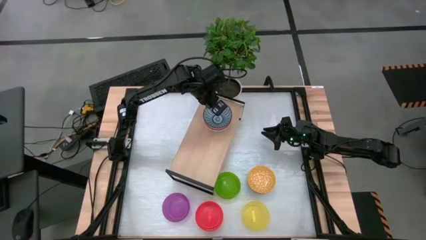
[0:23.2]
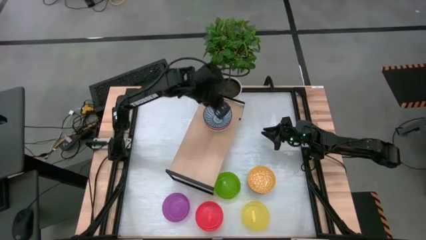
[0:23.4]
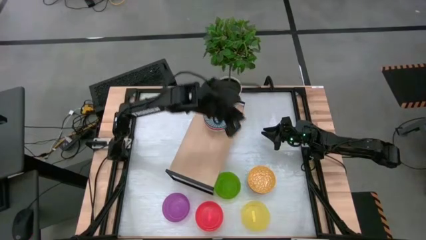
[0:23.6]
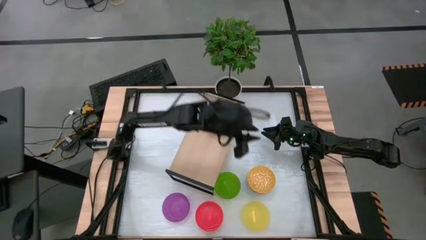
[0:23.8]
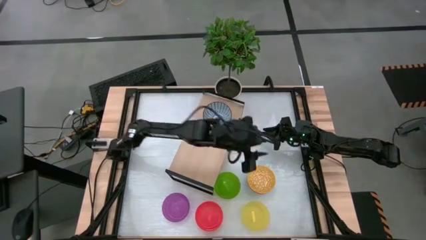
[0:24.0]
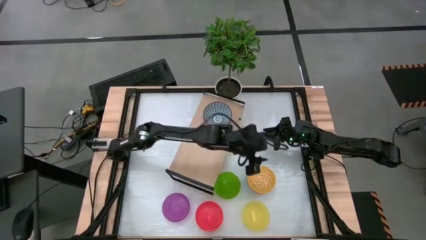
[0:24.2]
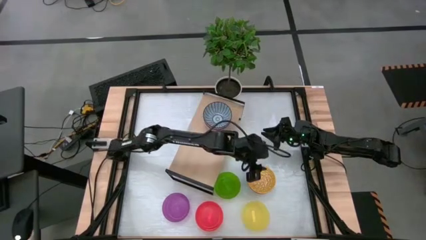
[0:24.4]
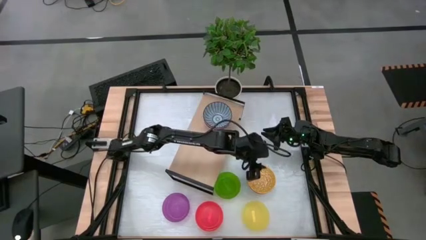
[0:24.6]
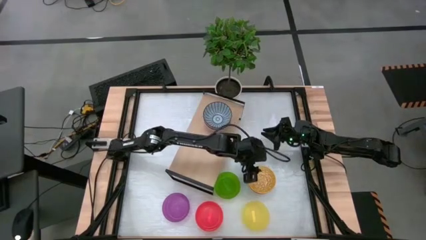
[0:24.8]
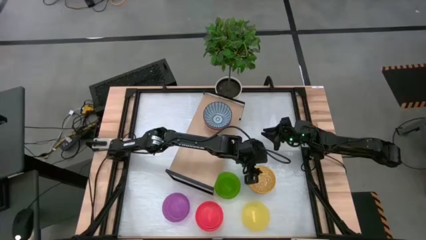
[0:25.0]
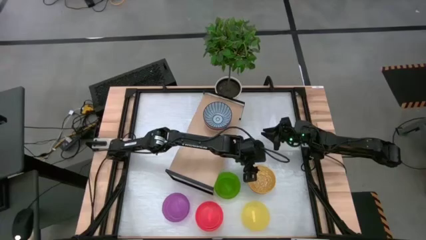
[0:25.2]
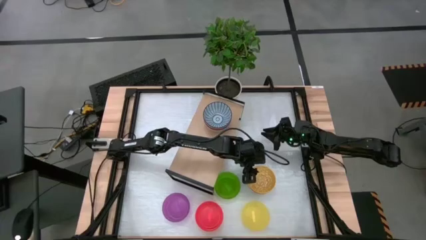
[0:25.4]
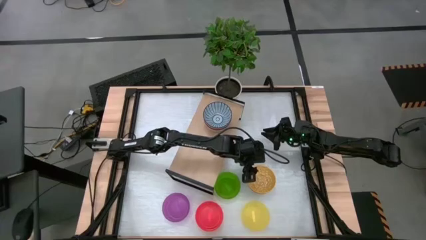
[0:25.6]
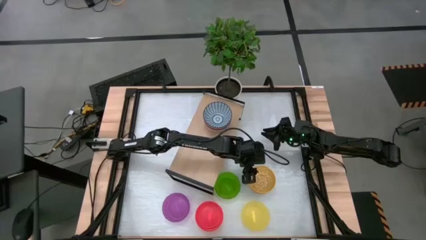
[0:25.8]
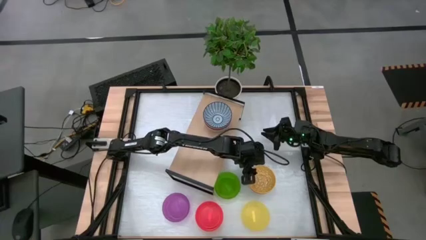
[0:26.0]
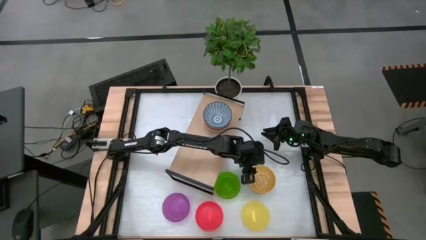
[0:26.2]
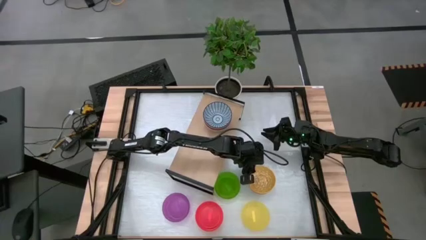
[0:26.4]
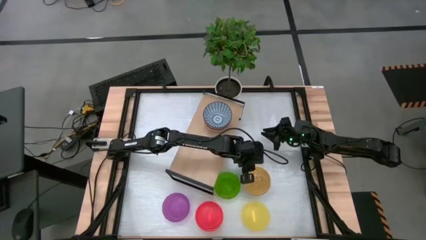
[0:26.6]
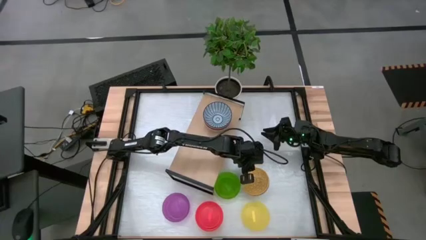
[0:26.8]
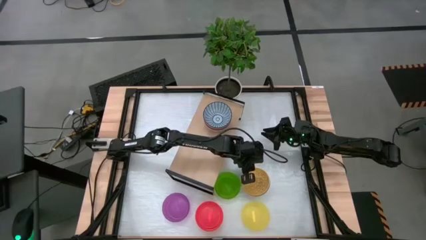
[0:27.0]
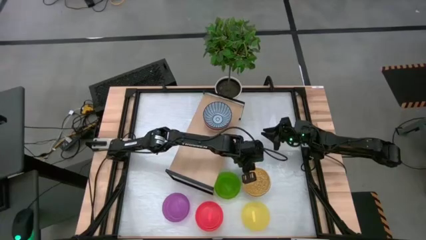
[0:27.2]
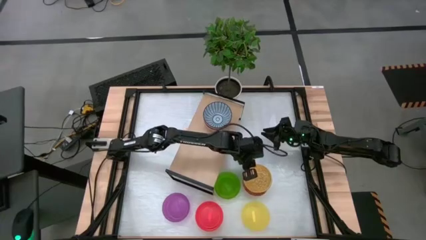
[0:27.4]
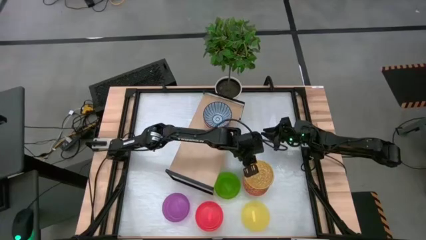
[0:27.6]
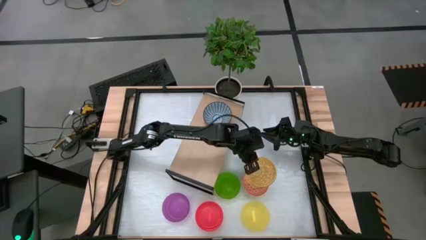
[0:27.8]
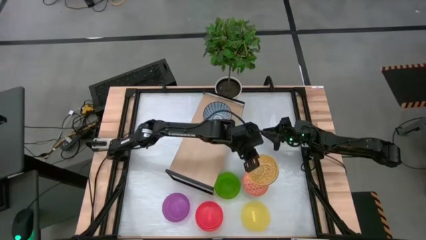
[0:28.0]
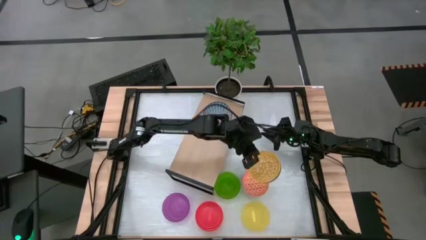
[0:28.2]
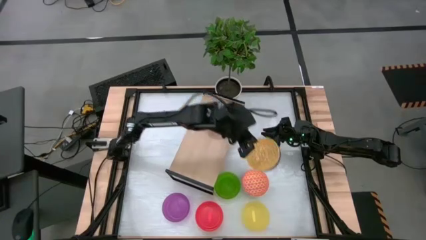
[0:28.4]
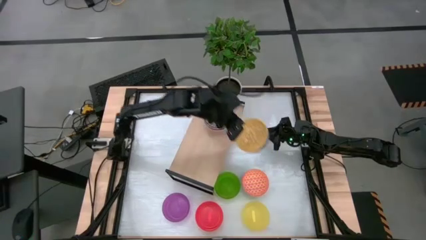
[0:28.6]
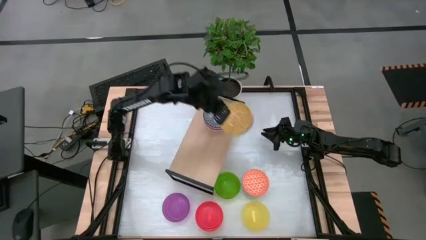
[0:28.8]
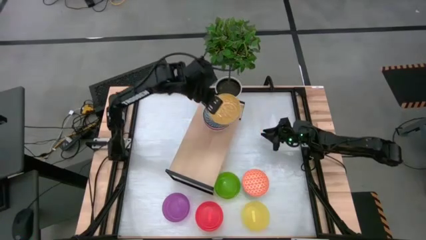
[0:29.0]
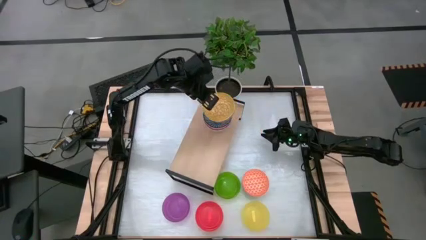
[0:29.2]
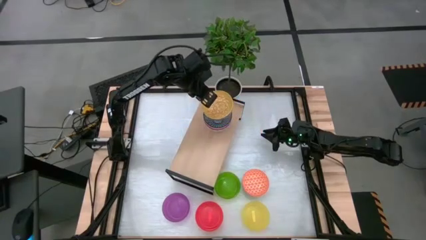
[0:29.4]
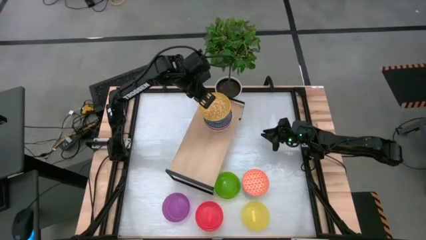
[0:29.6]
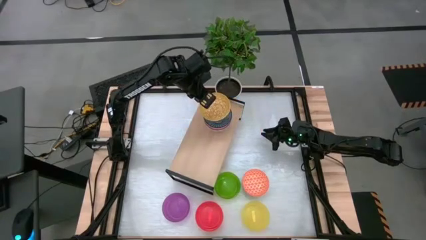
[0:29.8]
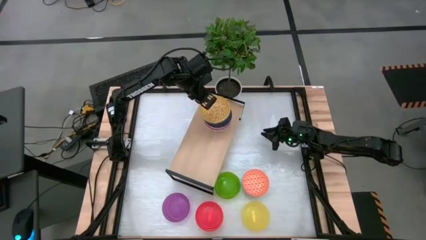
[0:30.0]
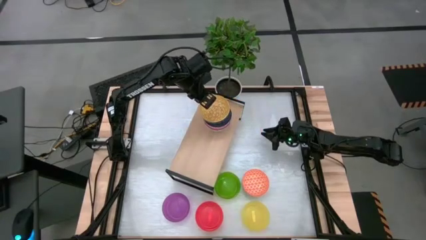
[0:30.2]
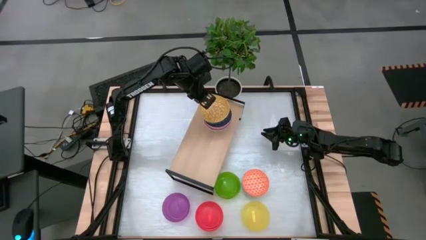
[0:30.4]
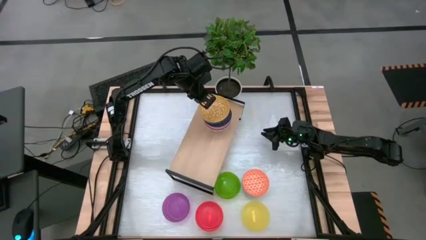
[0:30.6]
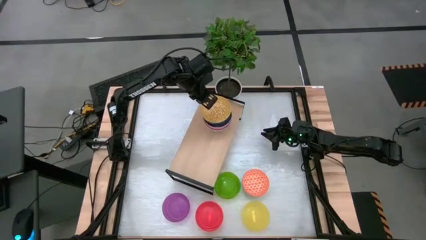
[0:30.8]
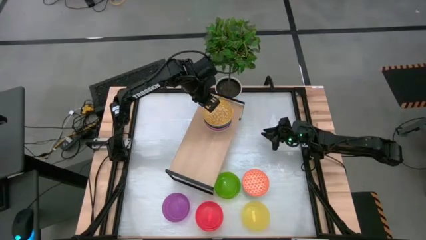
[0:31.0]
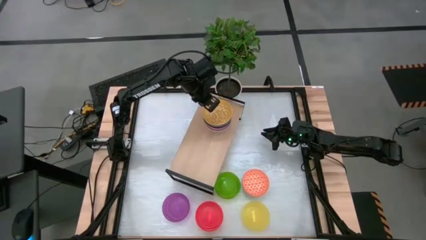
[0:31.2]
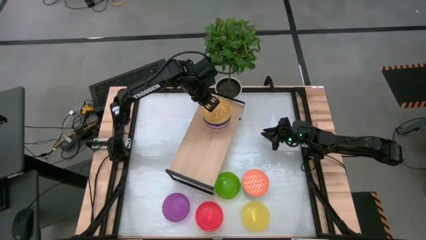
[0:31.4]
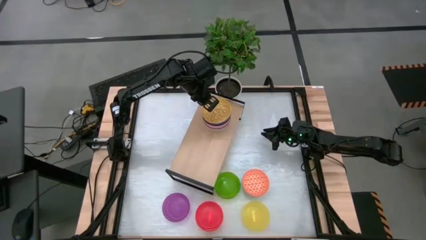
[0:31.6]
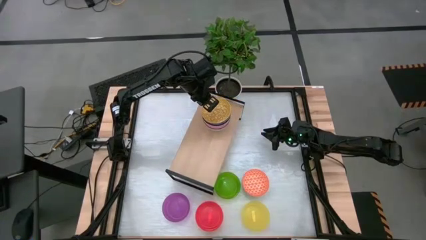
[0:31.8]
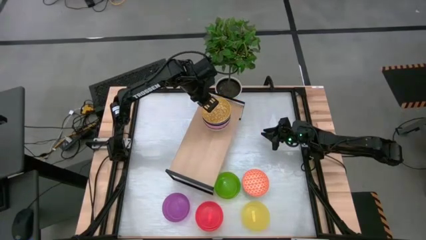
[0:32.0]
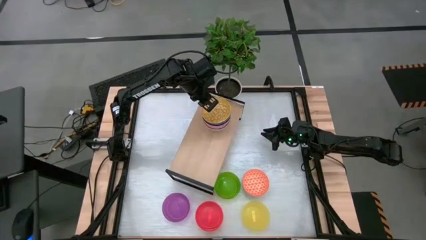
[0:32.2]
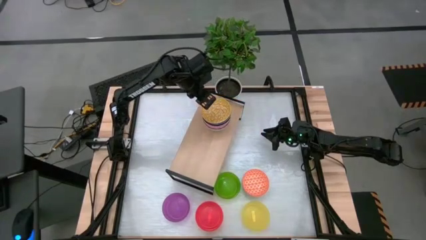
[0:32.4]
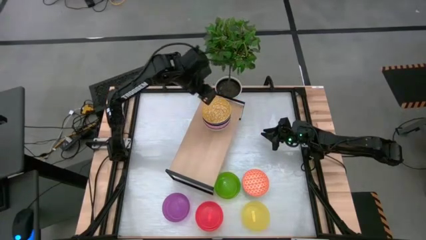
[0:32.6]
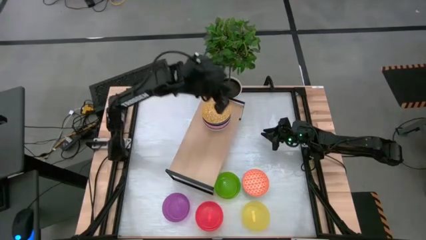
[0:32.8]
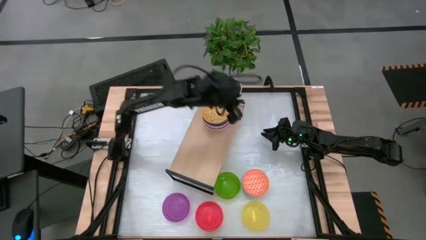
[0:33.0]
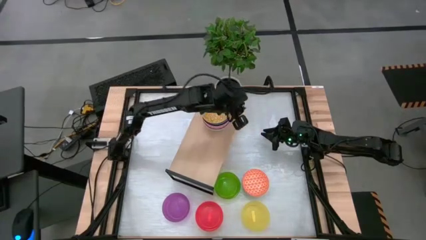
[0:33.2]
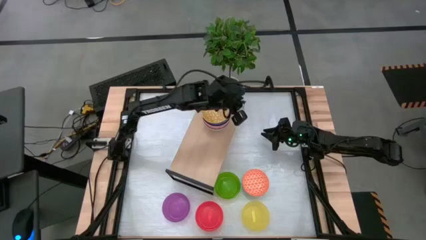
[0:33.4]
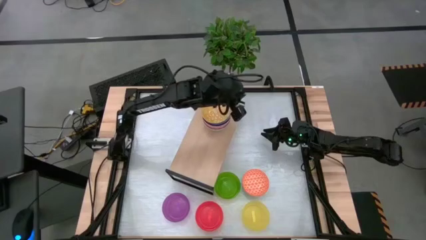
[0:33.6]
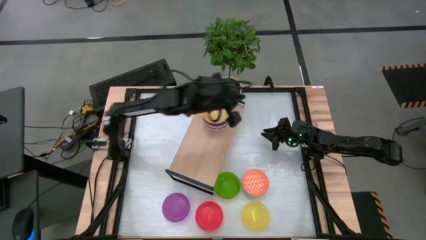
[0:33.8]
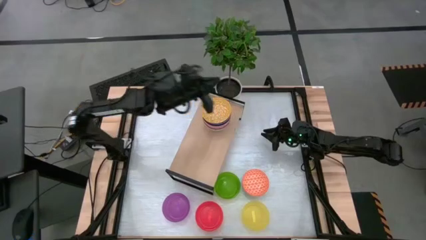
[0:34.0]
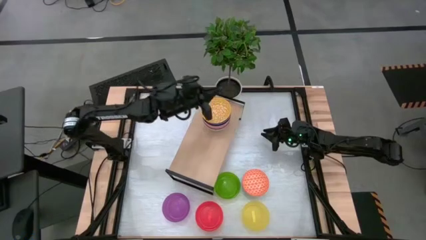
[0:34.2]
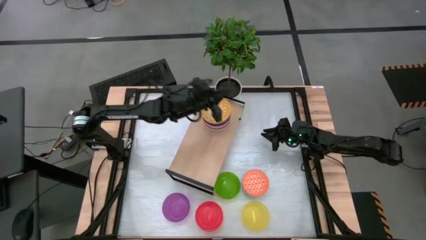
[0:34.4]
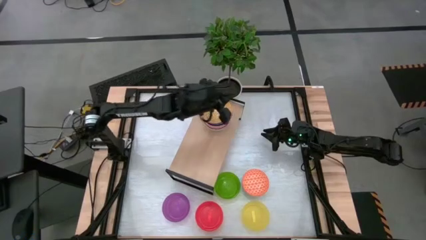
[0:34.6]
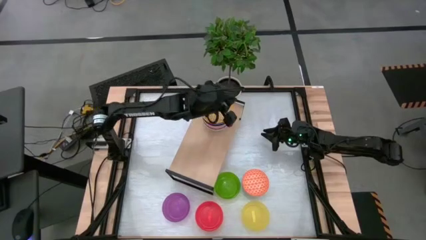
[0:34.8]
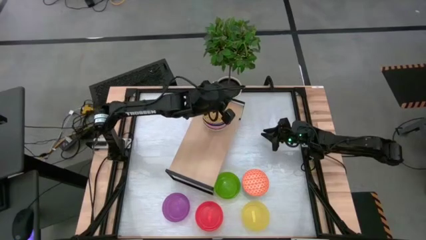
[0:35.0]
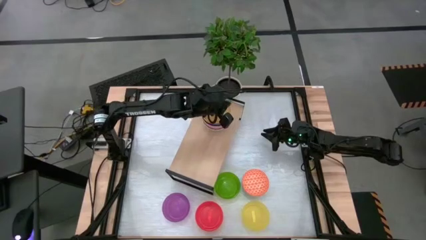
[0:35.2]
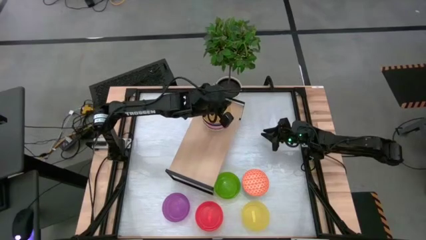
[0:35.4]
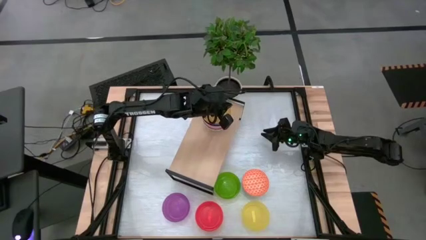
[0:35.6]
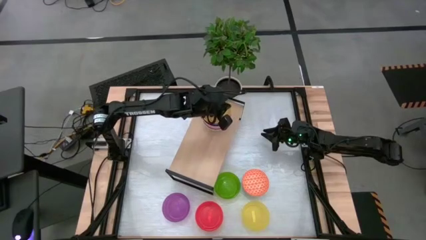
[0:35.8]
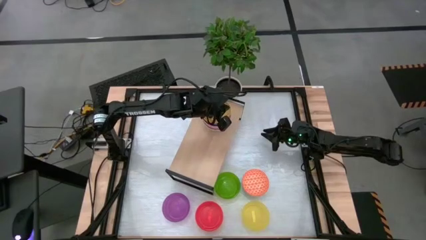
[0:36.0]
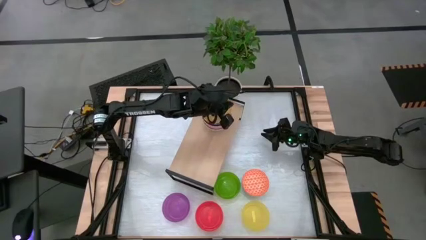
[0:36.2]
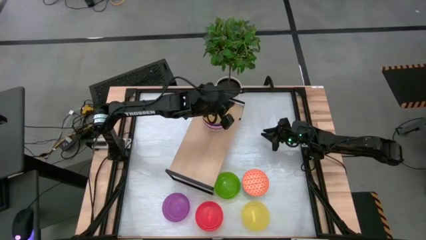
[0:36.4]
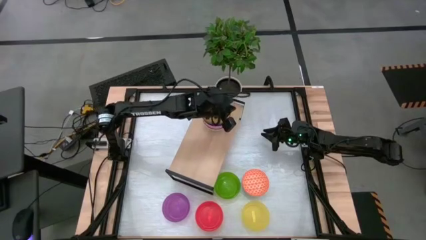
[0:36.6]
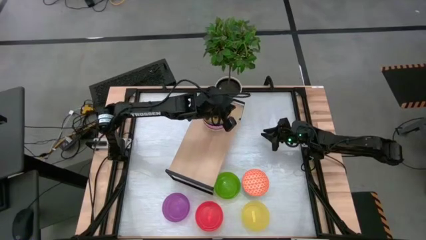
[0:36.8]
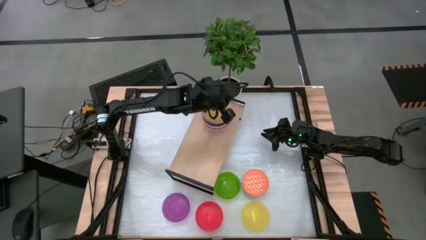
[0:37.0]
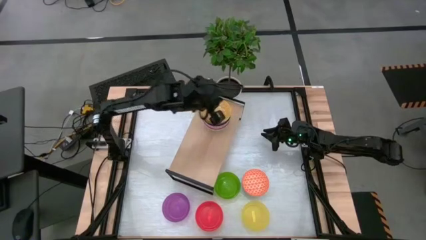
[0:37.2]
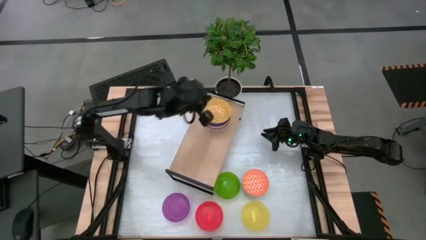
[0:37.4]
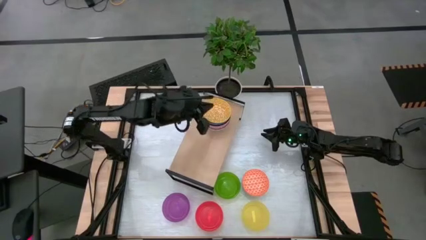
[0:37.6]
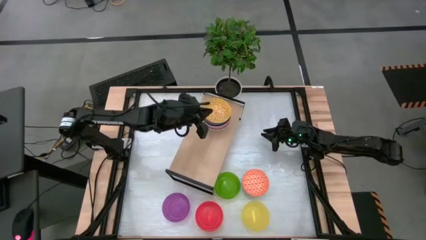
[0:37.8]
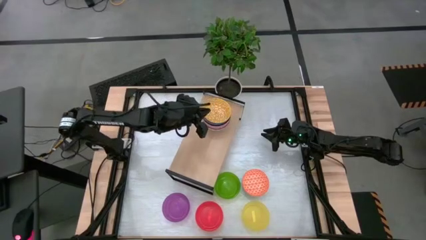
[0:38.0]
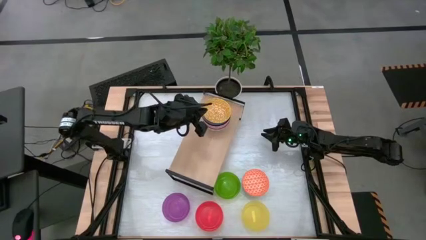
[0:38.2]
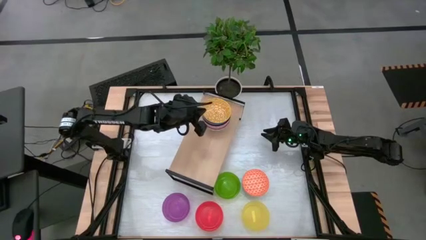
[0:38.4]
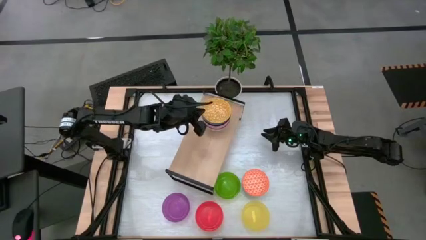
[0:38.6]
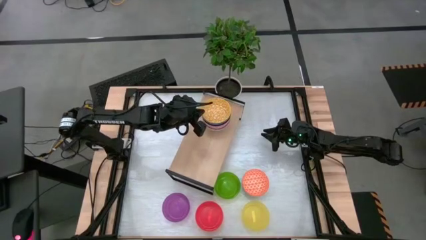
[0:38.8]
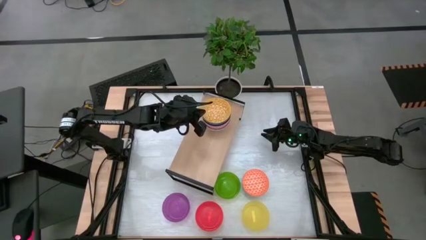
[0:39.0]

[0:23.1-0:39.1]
Task: Place and stack bowls onto a shelf
Stack the yellow patterned bowl on top of the blue patterned bowl on the shelf

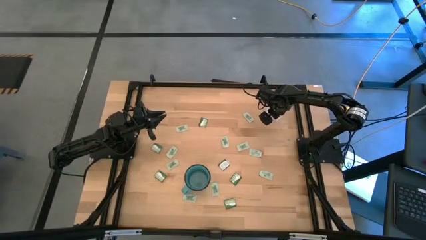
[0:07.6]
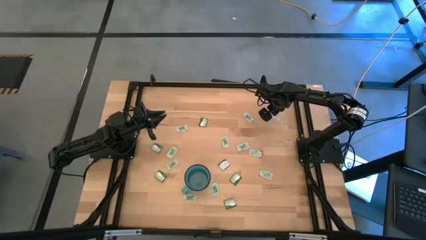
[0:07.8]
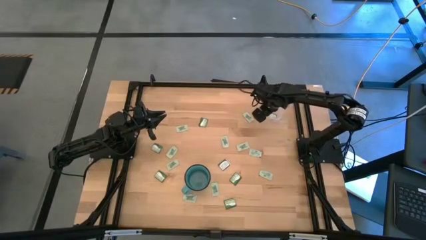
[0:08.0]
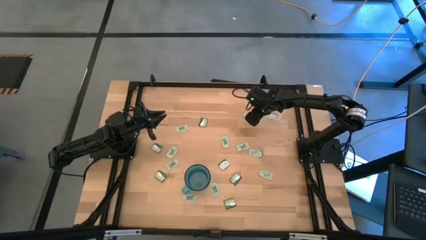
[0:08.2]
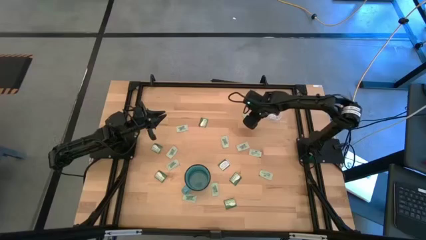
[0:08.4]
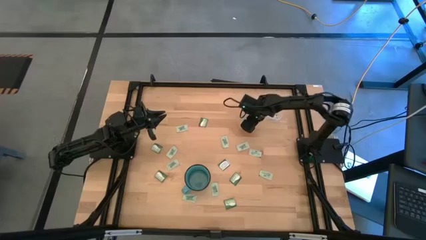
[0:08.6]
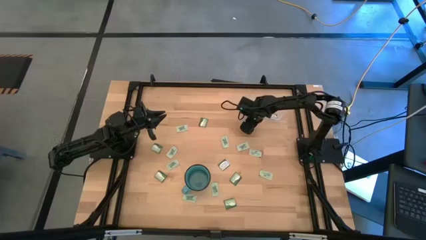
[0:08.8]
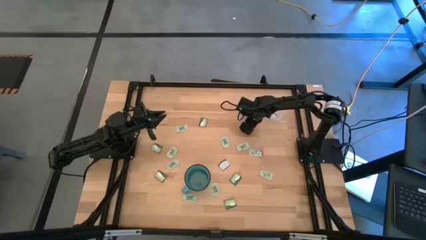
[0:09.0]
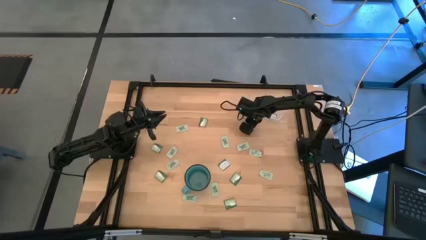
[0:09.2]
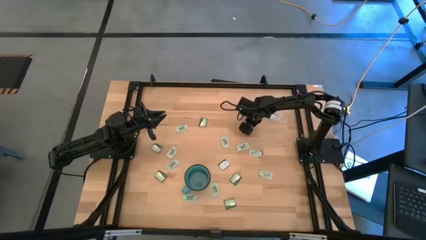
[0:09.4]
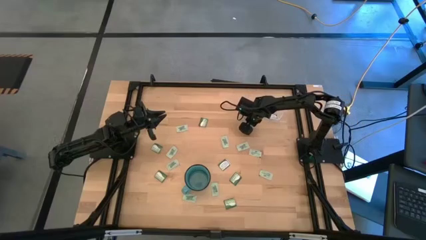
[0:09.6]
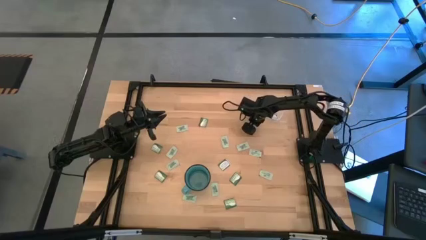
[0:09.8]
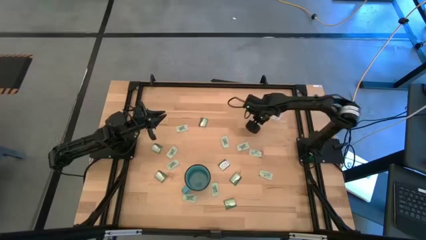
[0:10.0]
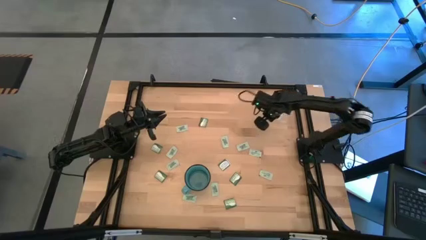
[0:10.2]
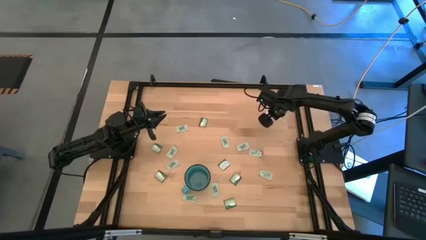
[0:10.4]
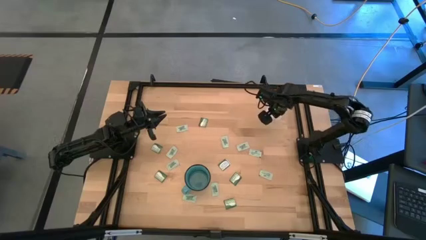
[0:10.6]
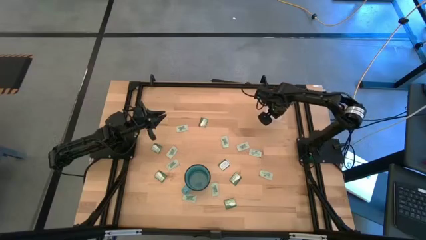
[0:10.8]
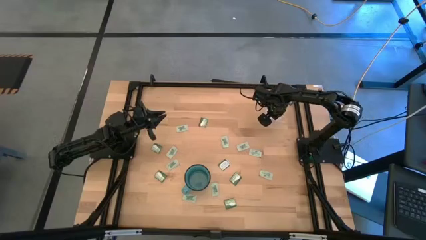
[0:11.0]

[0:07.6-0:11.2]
Task: Pick and place items into bin
Put the stevia packet into the transparent bin
